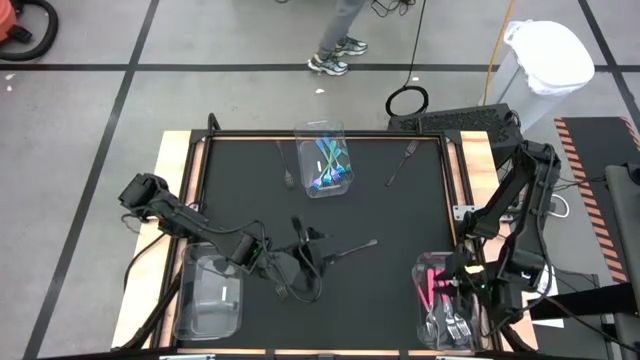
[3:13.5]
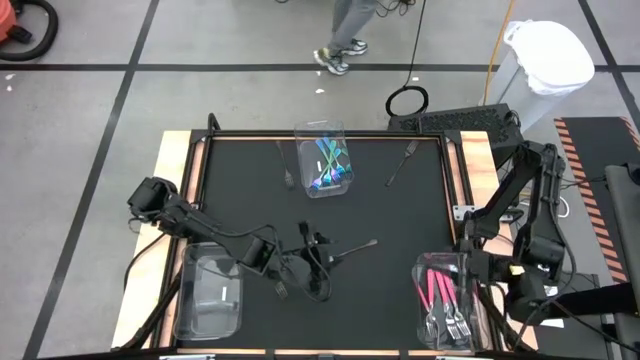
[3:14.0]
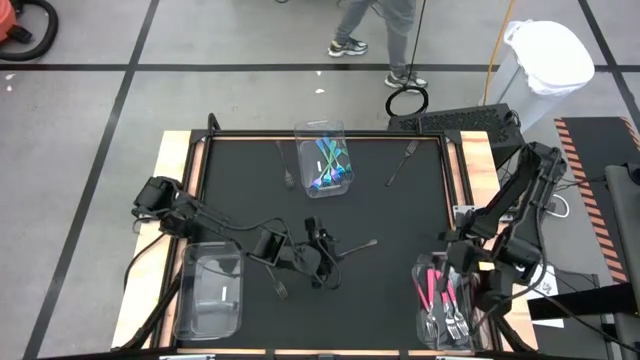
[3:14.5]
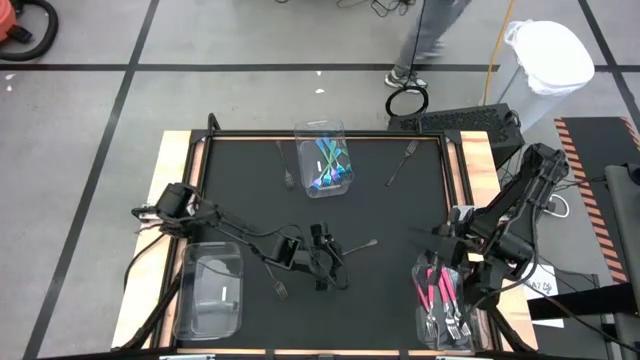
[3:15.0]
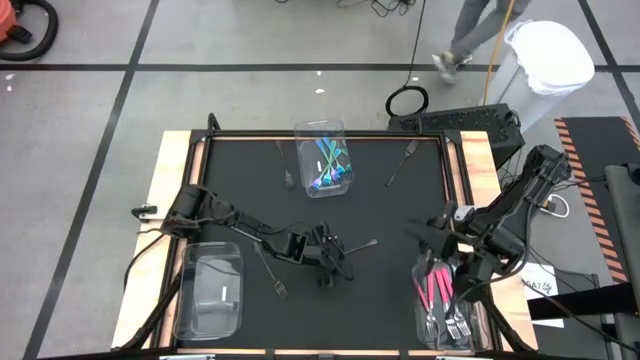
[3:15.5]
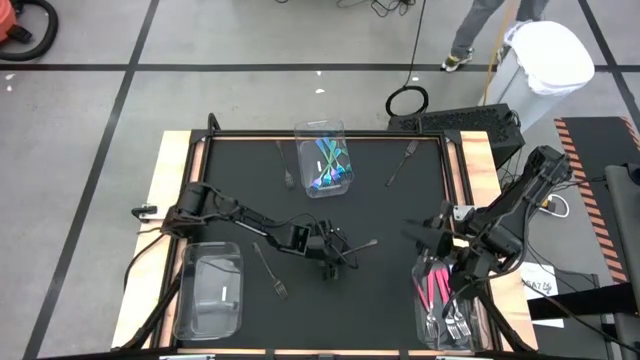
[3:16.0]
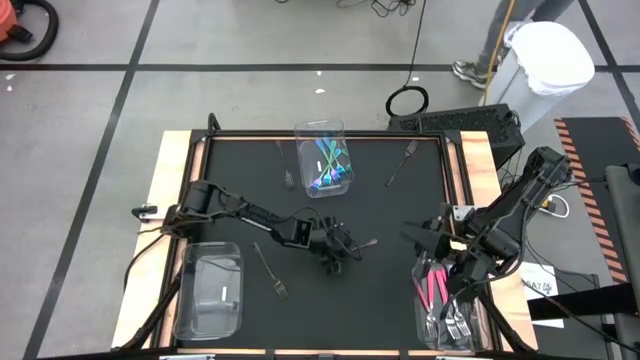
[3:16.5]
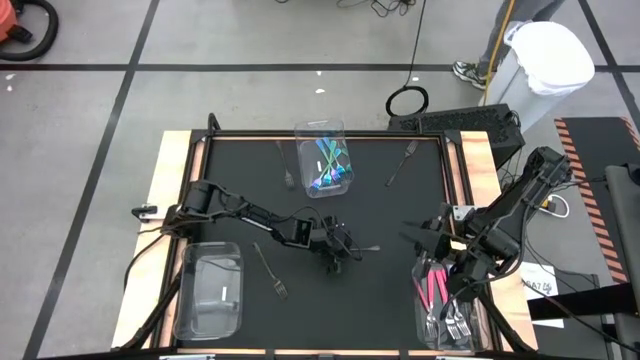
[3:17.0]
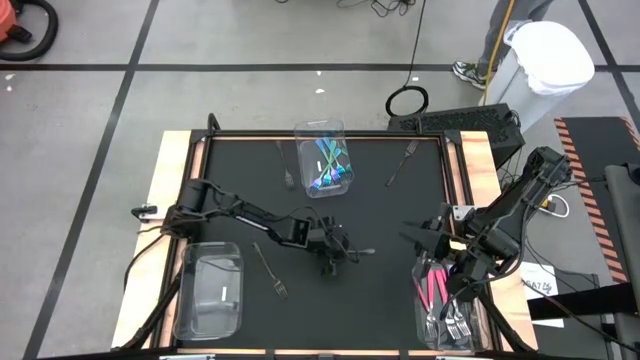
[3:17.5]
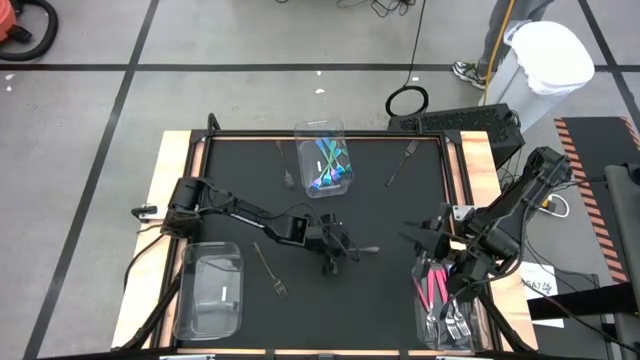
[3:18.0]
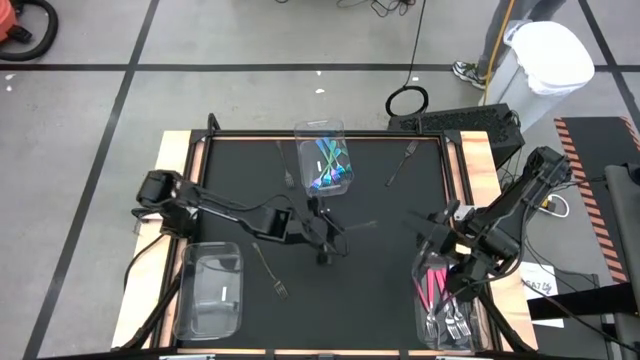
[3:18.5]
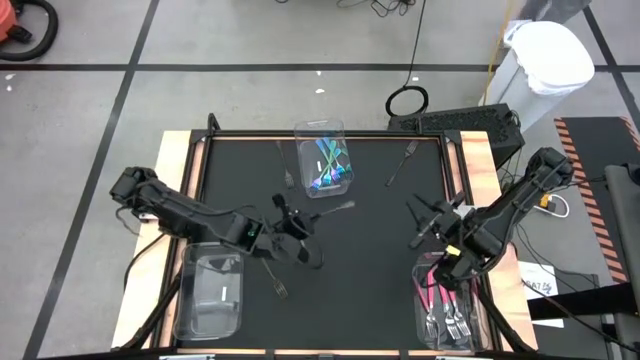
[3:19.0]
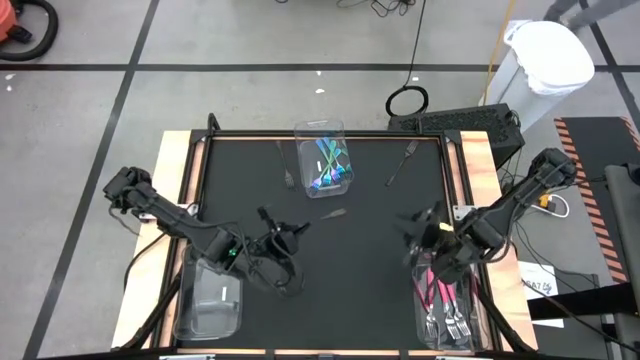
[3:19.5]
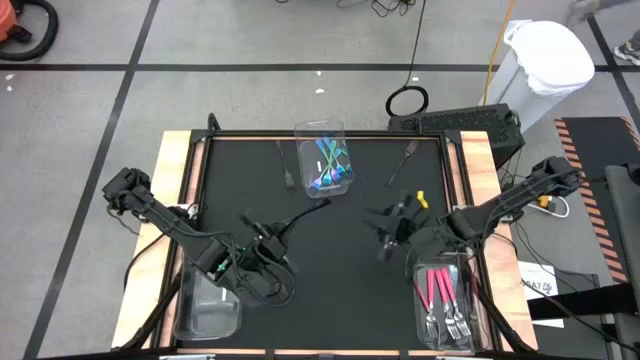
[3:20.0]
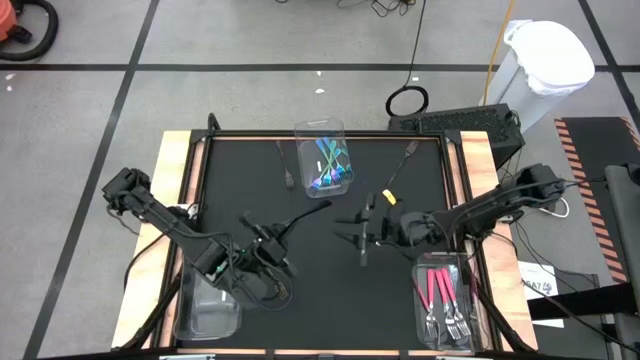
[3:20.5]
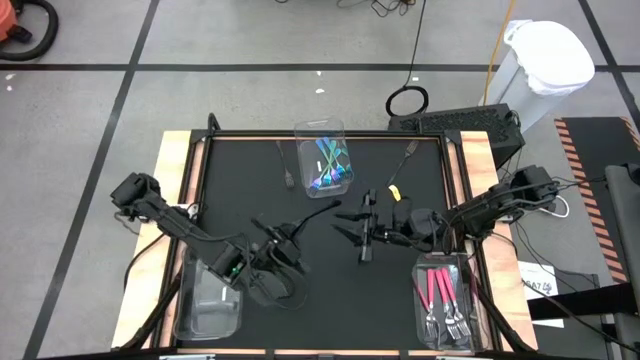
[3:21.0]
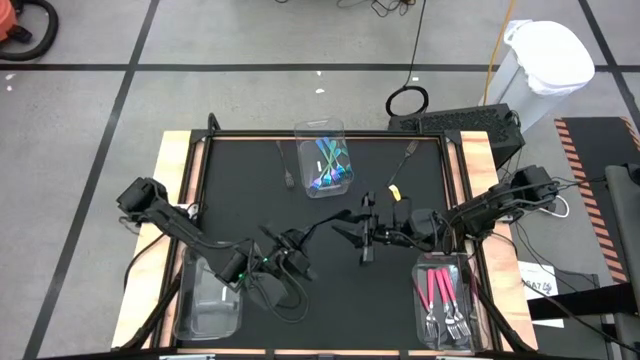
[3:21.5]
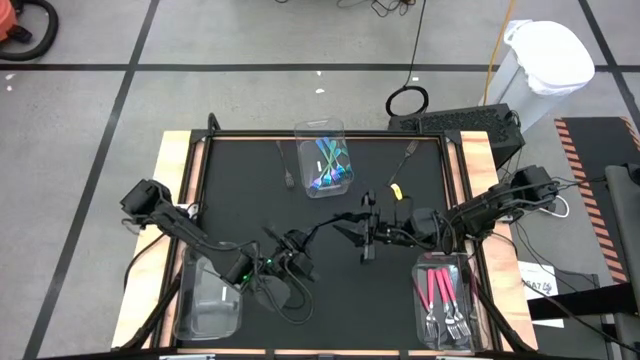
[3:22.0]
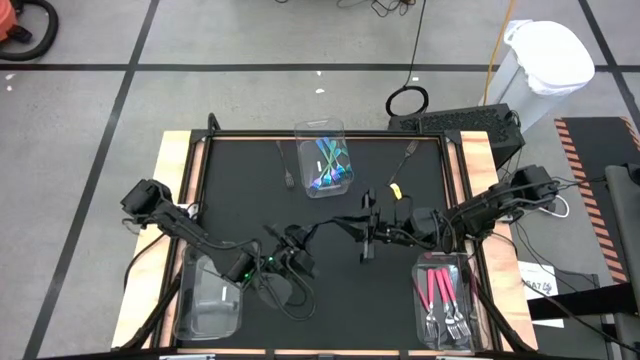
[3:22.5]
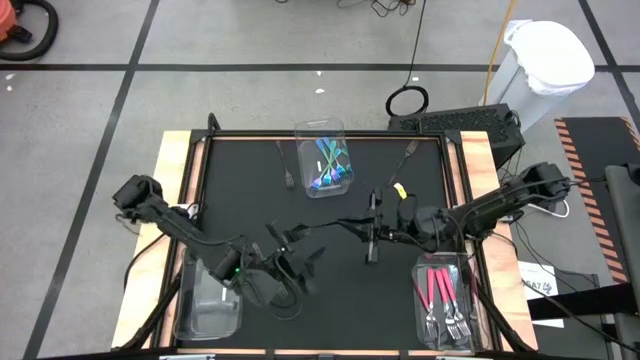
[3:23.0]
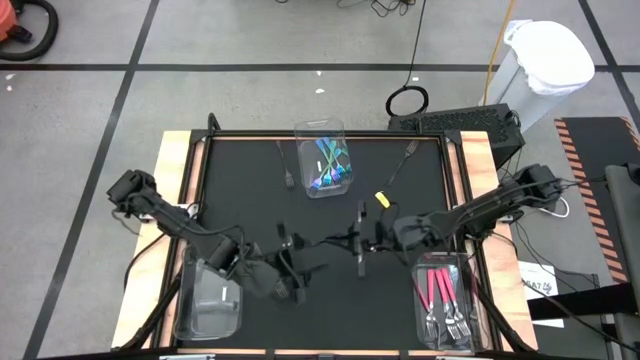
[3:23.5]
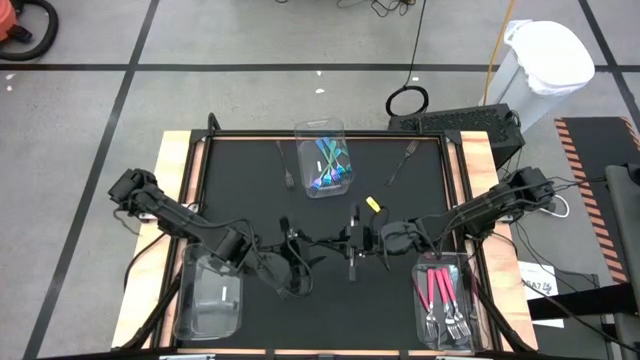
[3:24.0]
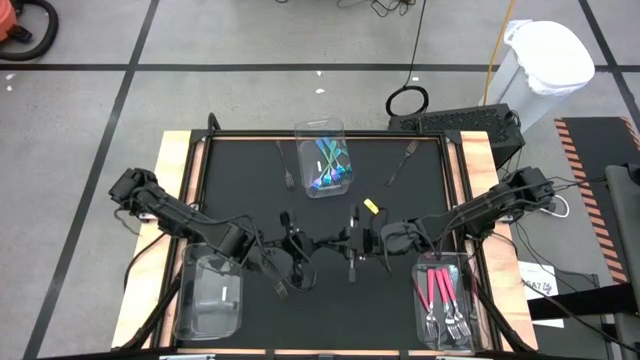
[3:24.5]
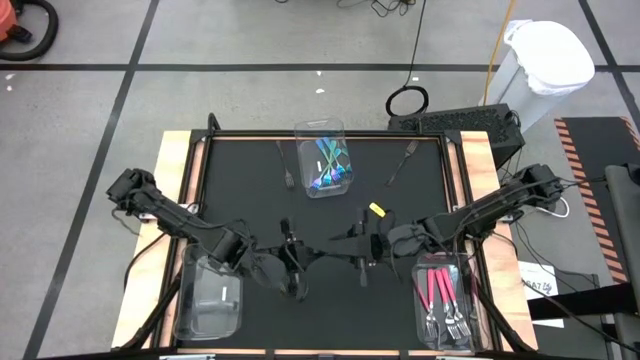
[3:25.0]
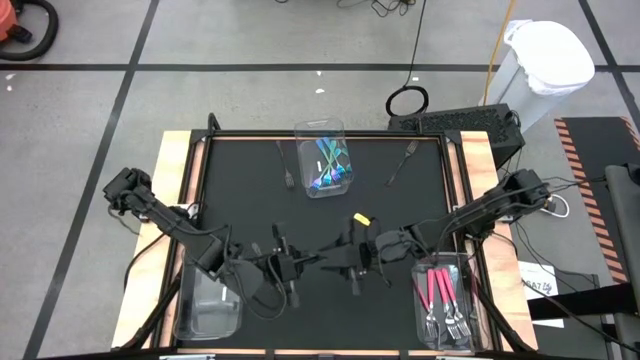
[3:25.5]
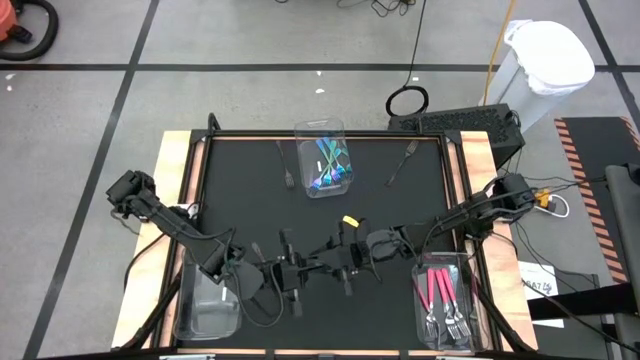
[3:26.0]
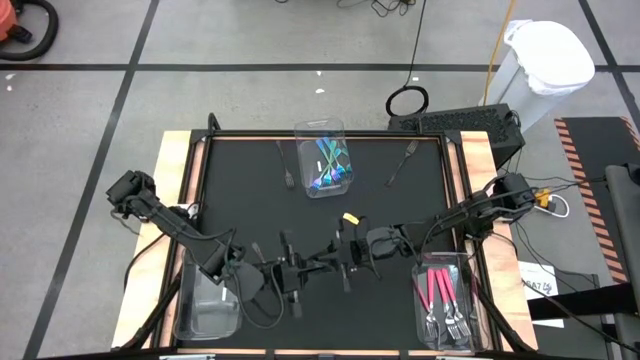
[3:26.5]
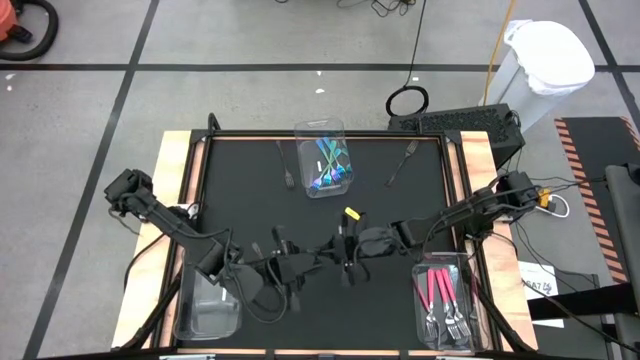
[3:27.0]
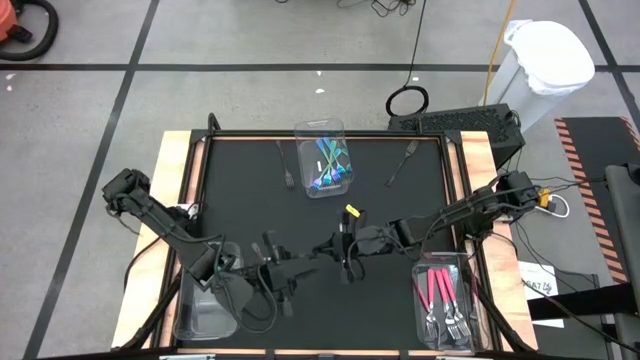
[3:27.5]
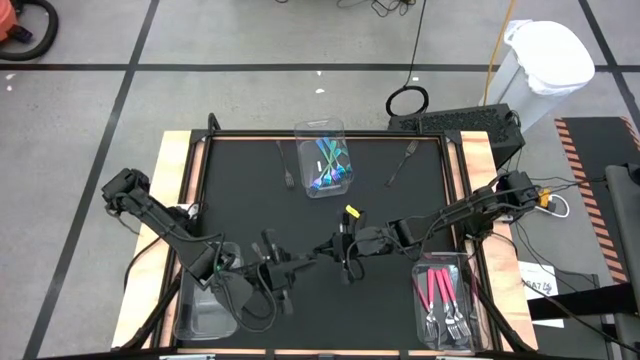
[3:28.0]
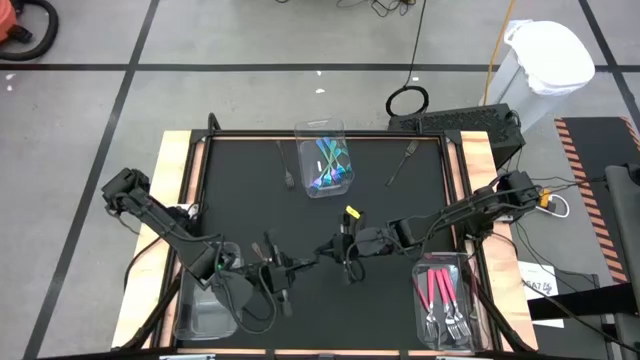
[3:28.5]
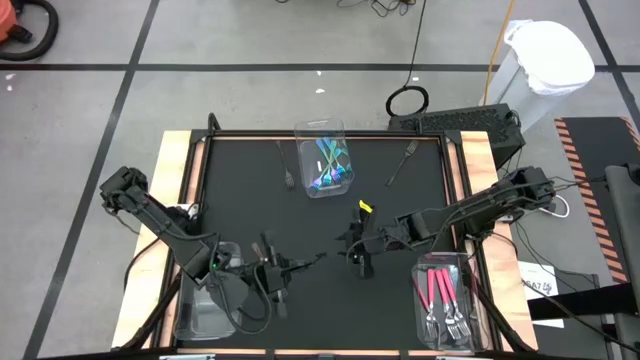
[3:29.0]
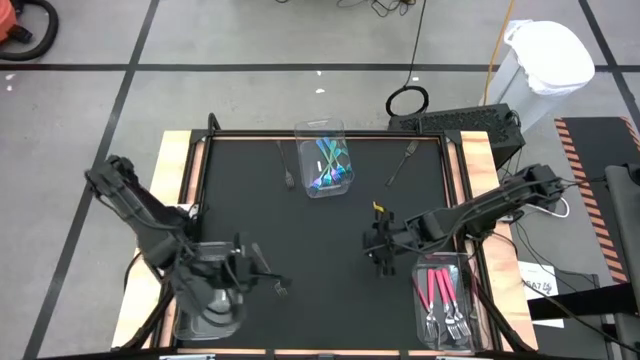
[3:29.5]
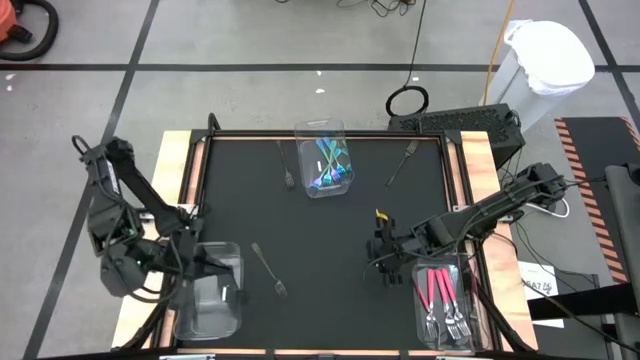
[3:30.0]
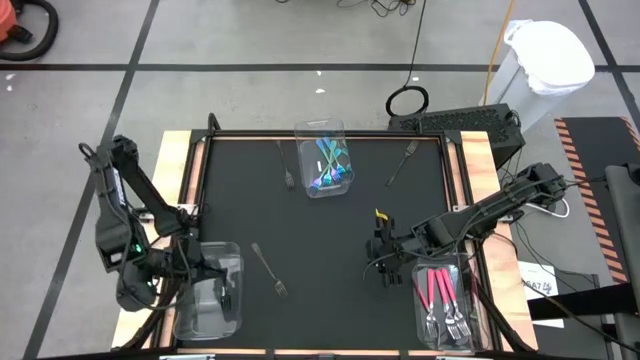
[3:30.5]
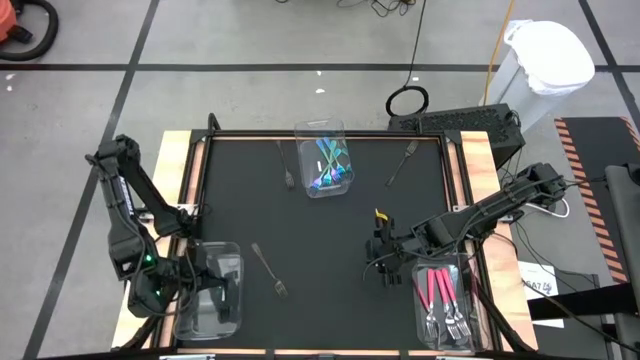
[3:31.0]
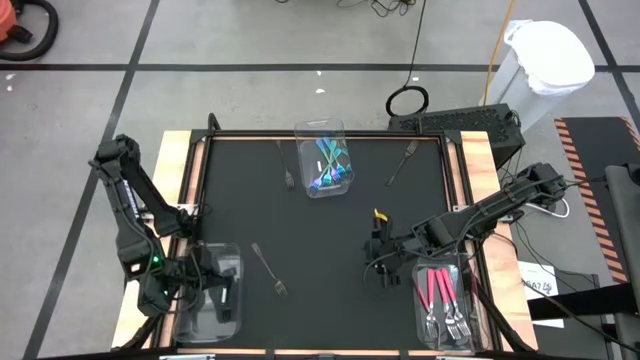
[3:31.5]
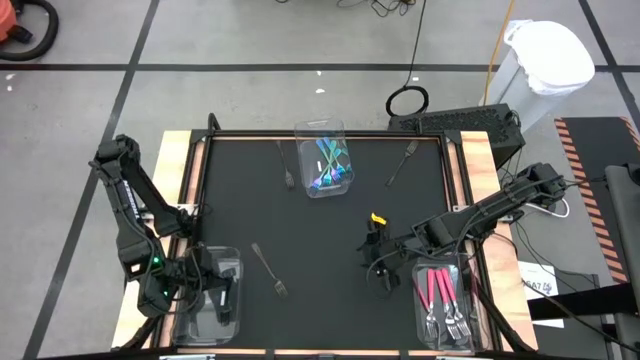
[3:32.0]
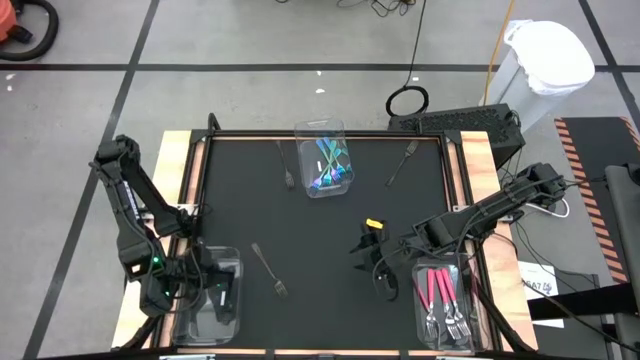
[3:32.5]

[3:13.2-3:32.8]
Task: Sort silverware by color (type)
Put the black fork into the bottom left transparent bin
